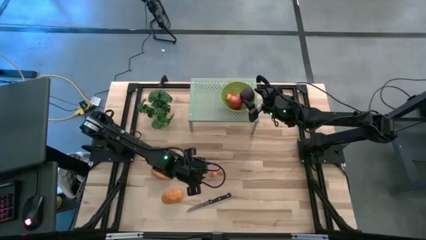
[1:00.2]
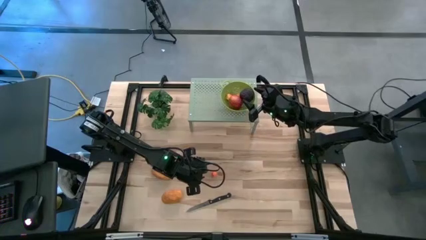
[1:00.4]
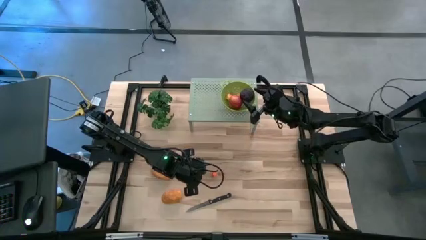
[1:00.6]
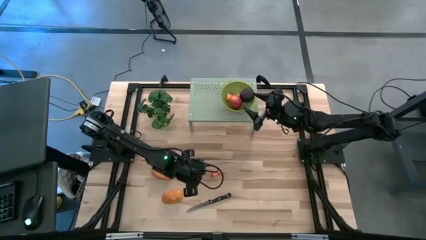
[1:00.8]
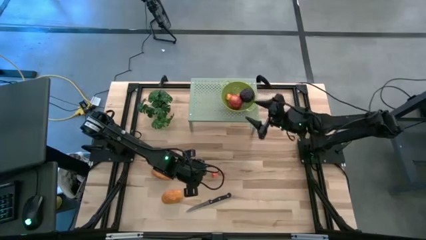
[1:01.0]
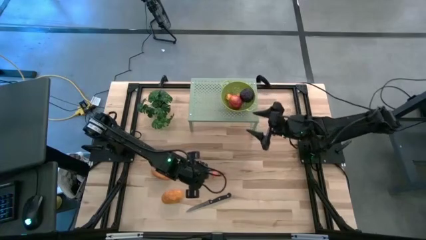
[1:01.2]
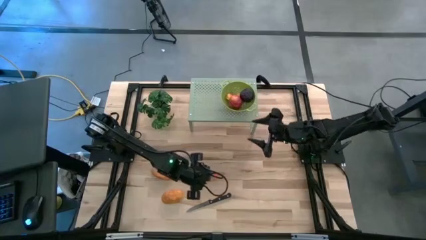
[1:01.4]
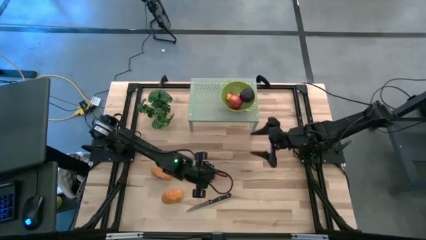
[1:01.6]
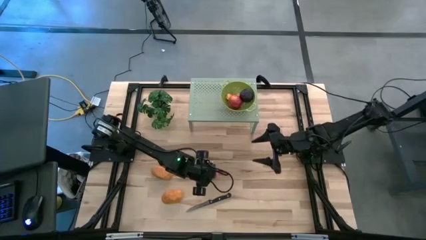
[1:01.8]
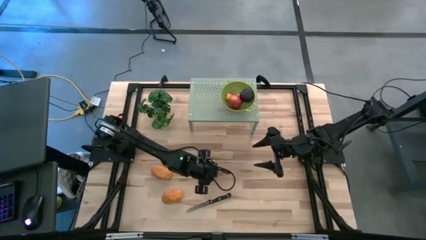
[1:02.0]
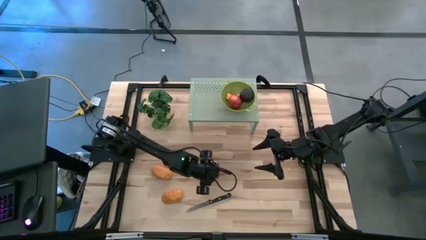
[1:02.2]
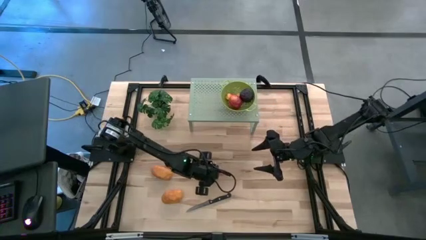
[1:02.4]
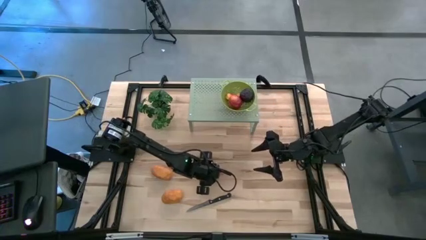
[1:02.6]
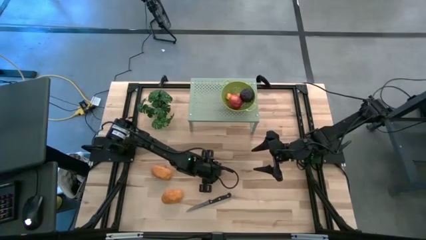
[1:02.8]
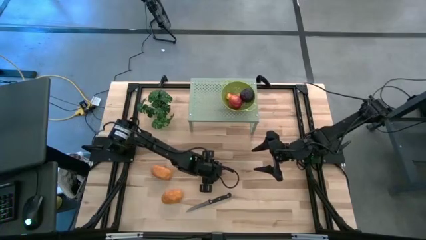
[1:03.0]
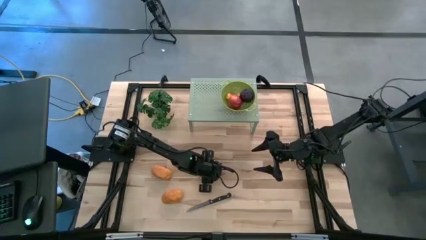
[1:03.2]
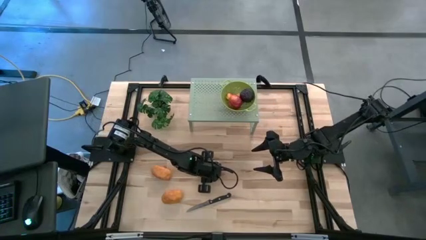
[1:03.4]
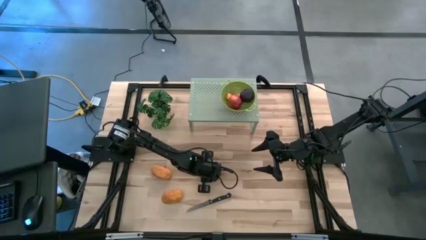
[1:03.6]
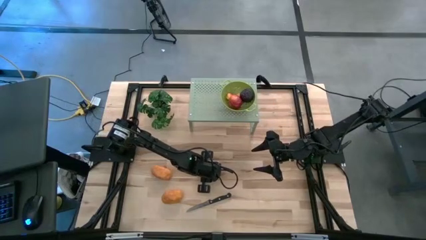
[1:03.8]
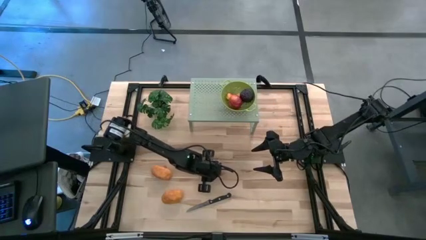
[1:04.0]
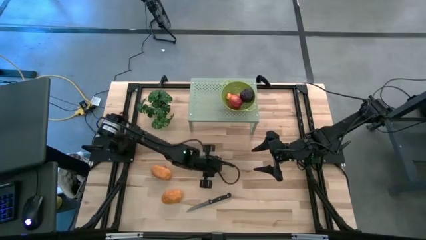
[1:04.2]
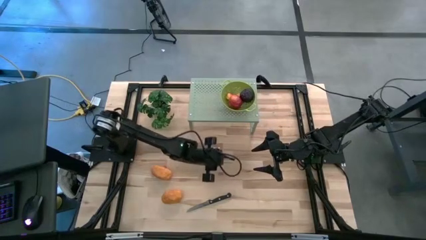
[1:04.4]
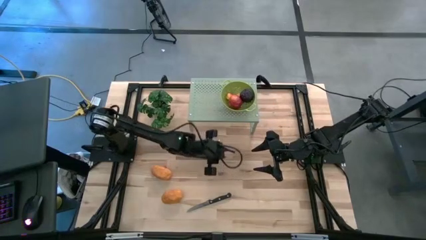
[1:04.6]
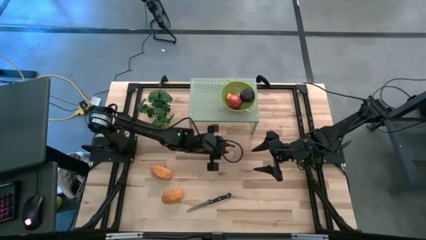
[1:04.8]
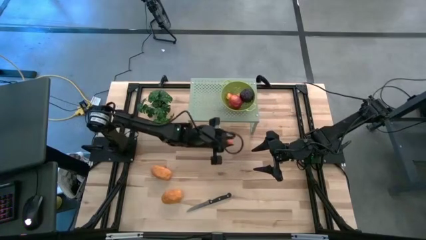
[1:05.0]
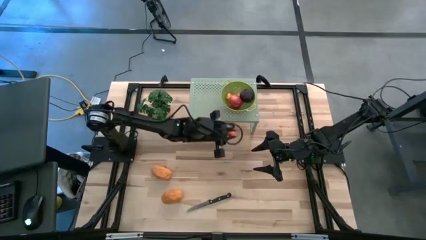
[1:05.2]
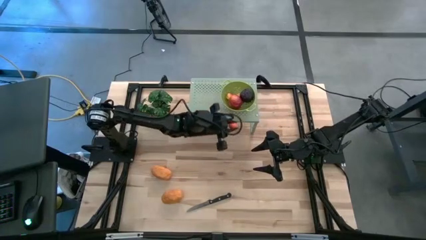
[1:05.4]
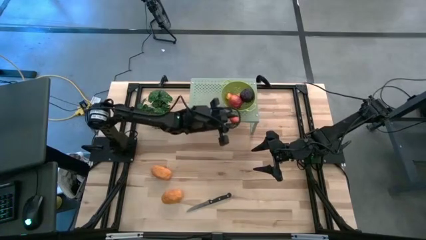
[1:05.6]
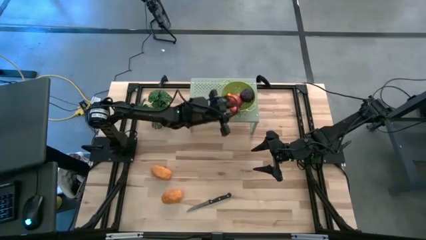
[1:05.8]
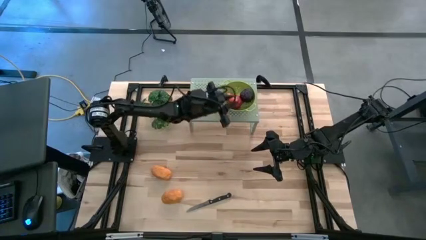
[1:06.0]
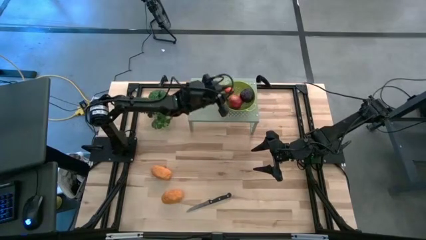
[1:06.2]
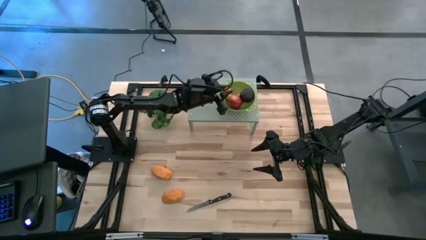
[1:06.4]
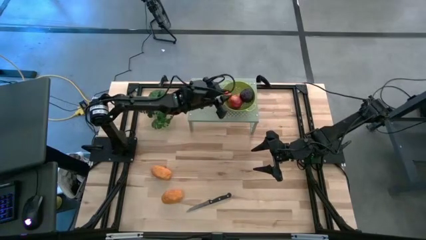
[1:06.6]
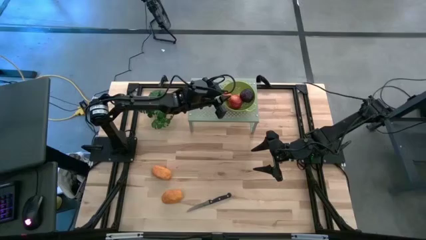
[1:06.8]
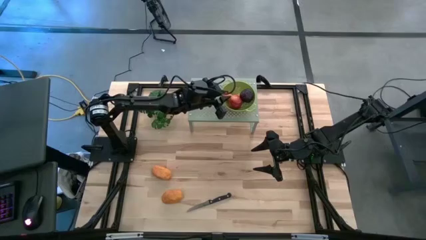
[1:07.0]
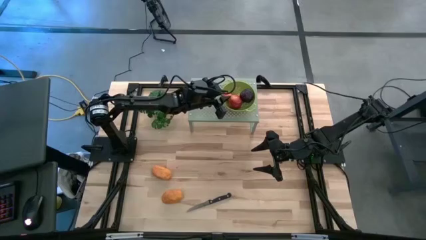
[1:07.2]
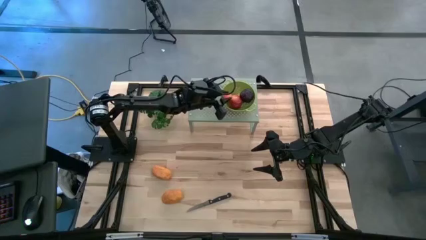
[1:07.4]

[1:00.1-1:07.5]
Task: Pick & Place Fruit
Put the peach into the strainer bowl on the shelf

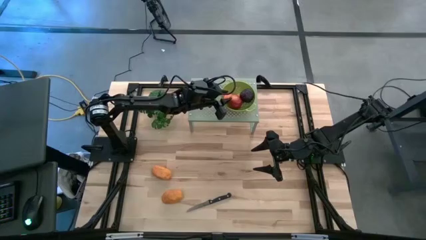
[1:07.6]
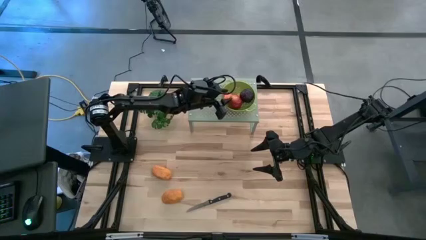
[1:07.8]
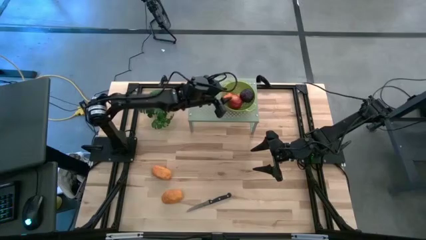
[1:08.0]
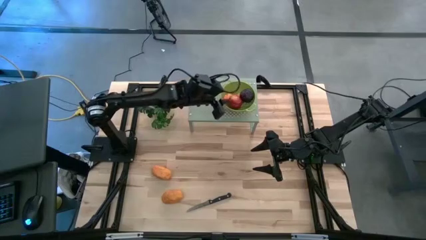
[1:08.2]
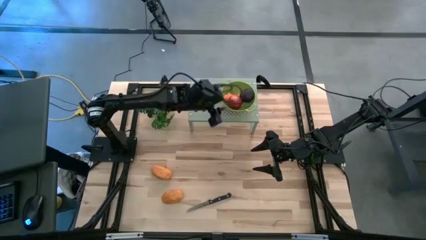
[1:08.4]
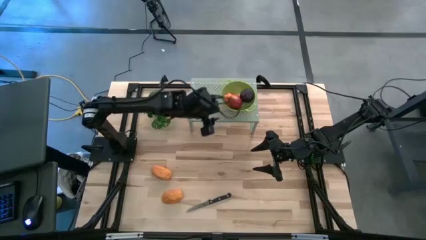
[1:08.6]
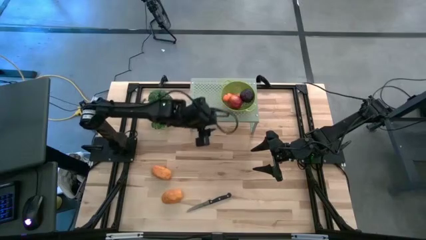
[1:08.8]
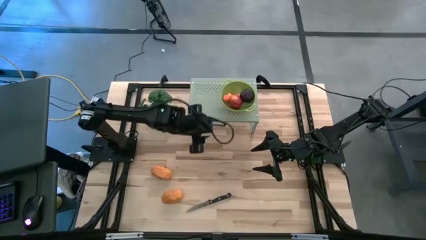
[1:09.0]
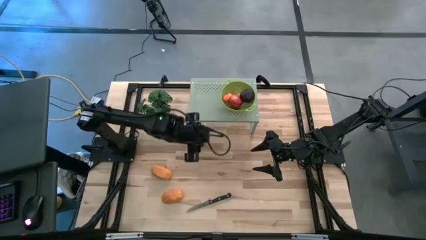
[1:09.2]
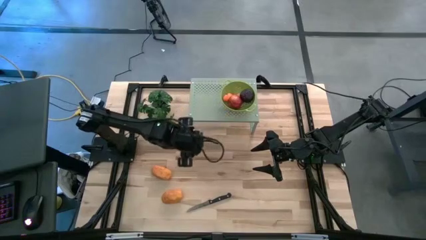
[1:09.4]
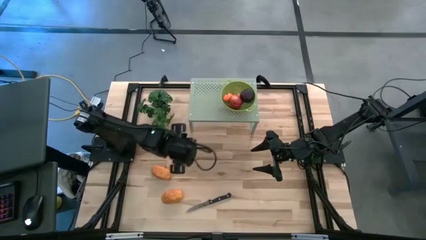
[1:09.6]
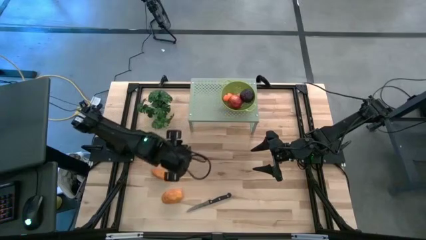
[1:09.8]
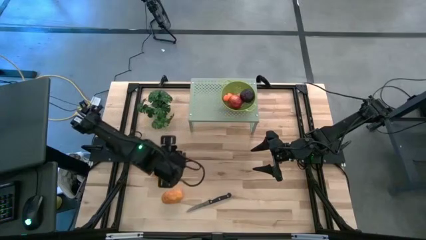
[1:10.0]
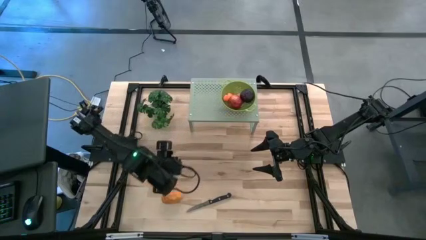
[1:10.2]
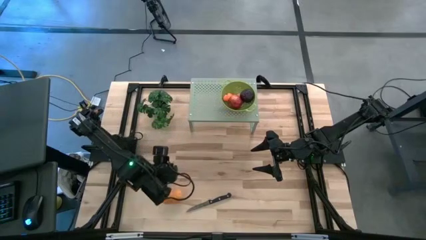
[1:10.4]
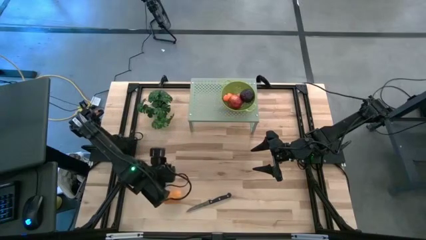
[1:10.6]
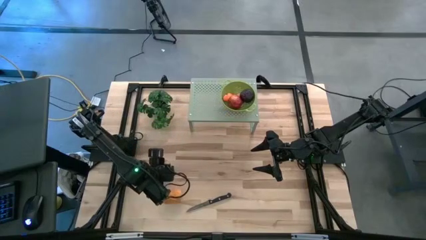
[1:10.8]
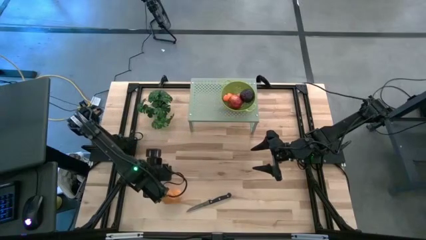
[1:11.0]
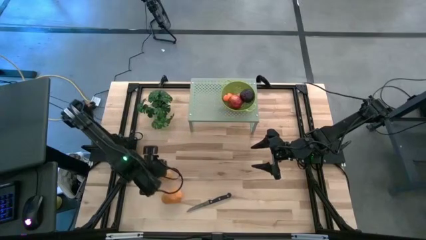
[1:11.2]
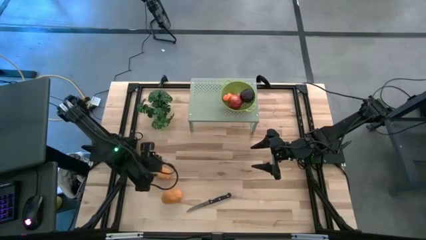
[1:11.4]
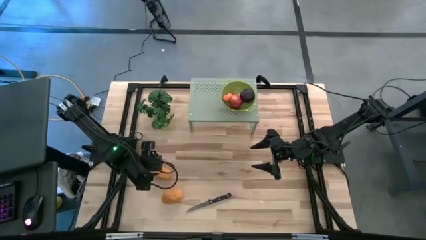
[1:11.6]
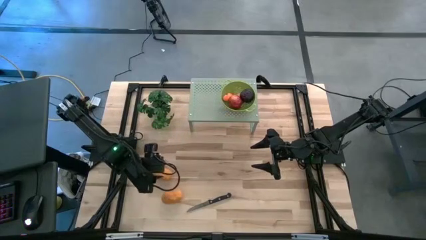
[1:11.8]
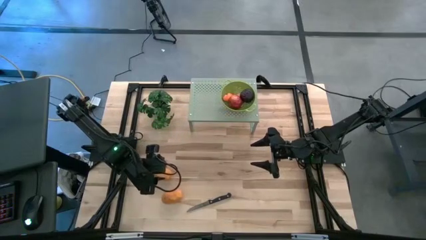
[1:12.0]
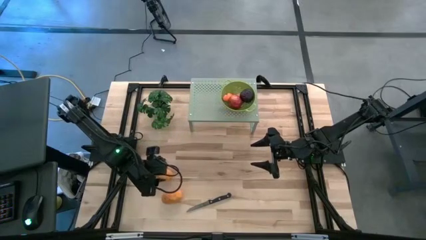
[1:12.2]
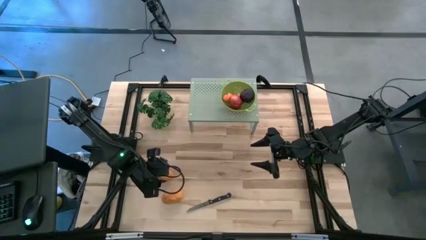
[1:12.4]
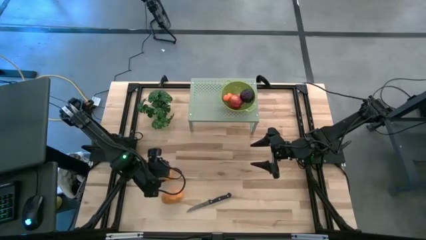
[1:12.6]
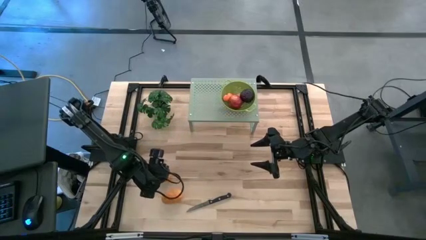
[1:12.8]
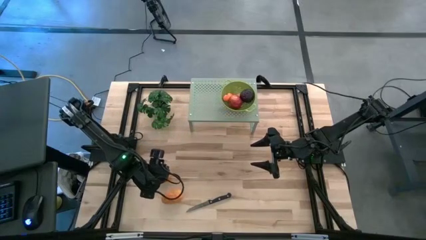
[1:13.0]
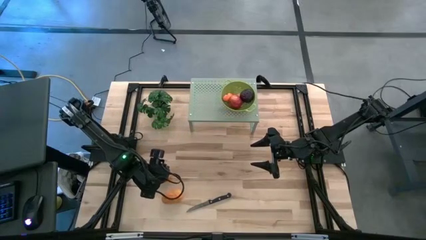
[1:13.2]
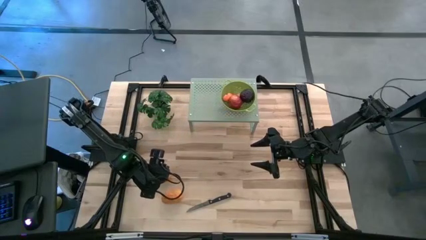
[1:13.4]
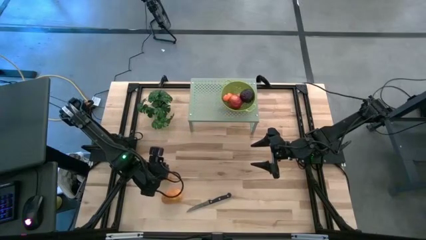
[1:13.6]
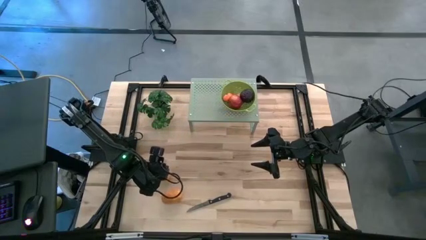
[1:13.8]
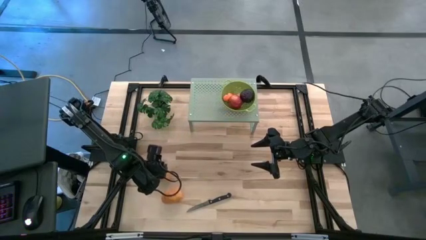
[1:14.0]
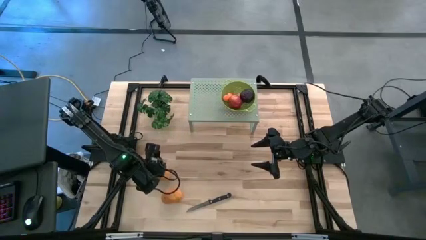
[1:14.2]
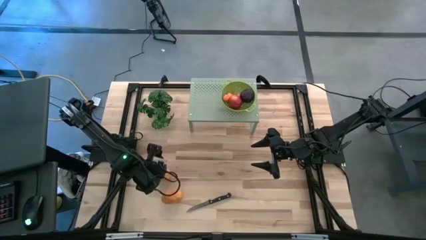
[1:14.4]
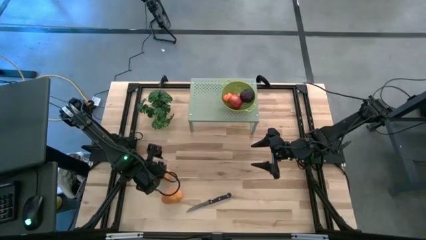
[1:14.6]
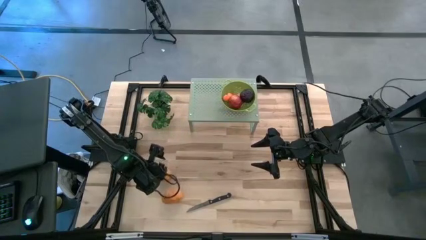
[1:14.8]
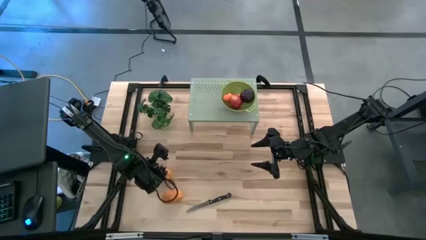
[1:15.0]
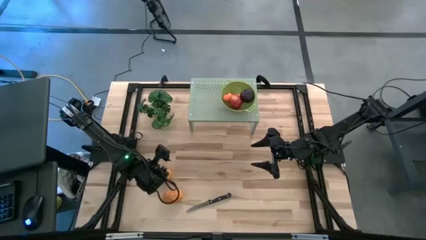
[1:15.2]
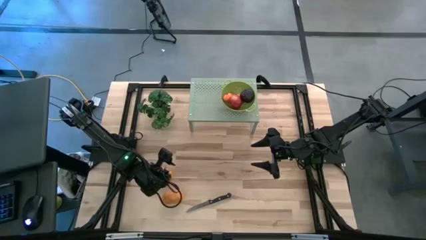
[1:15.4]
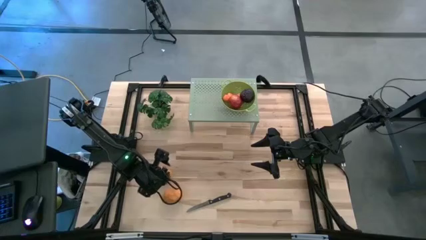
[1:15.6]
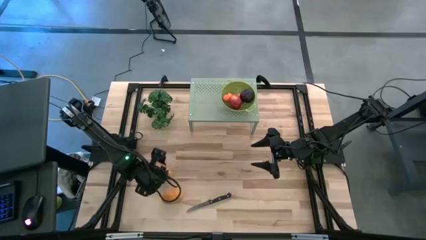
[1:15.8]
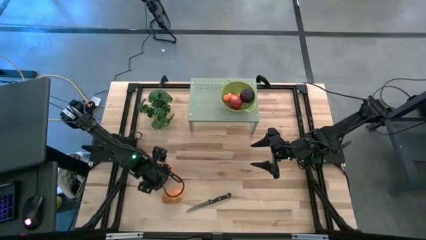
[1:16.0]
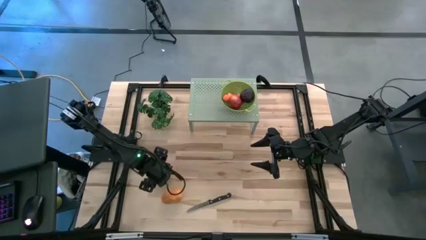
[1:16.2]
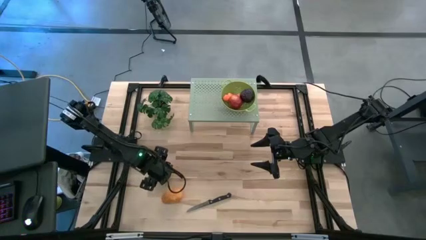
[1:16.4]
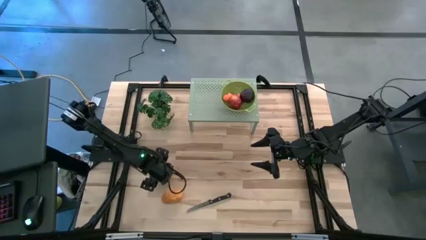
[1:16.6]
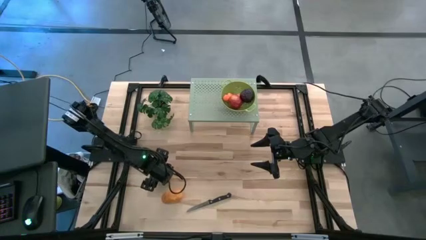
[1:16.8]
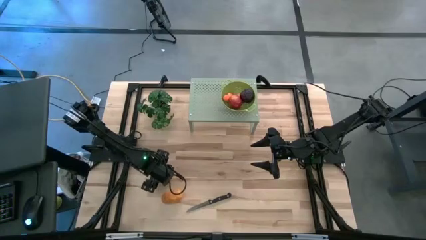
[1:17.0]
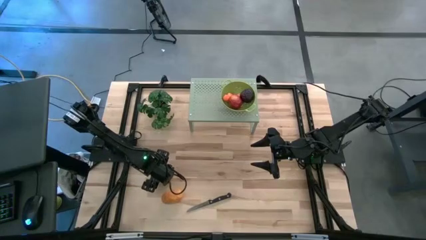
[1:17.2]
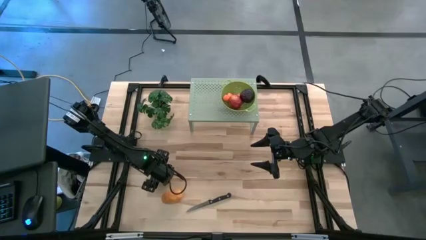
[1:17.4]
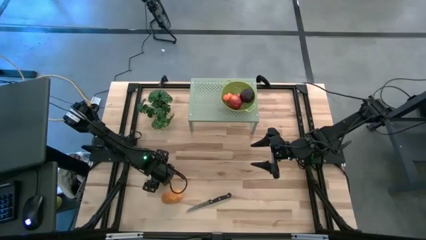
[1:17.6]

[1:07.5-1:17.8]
Put the top mango into the strainer bowl on the shelf
